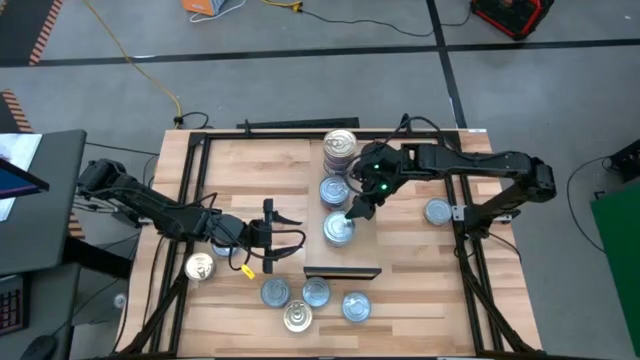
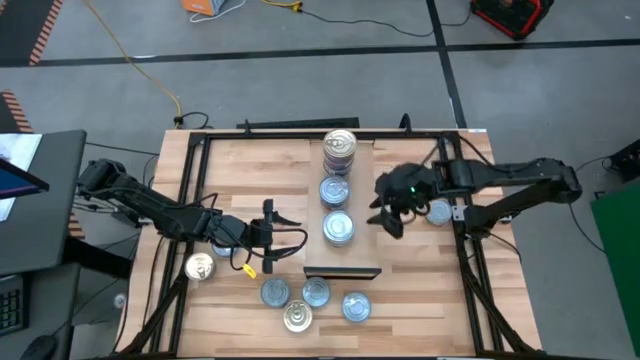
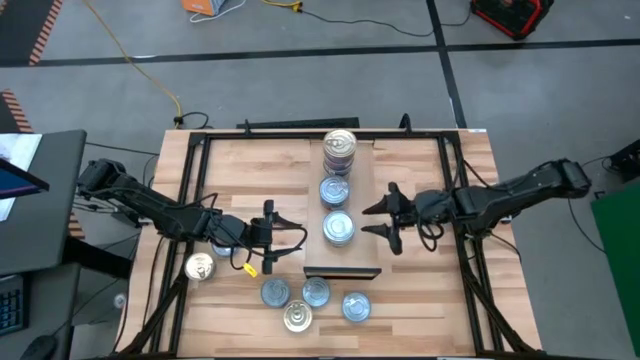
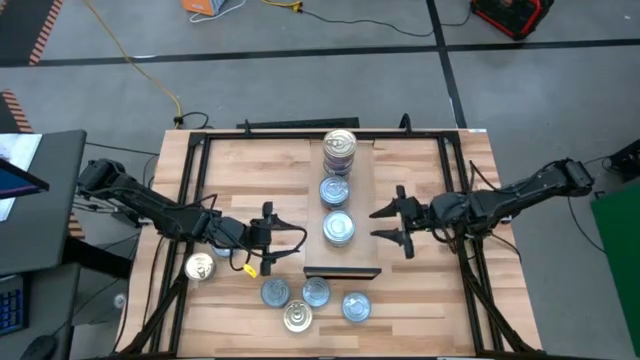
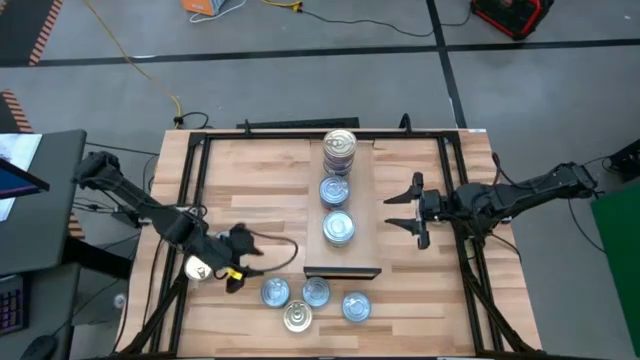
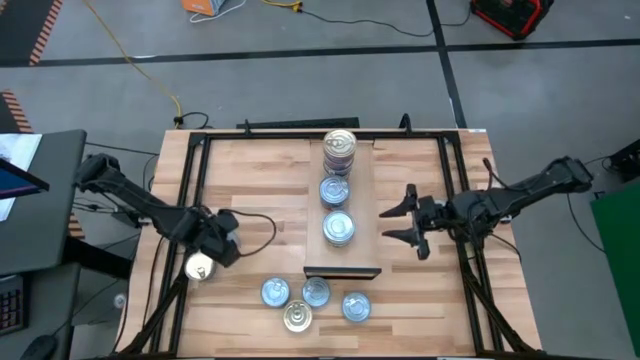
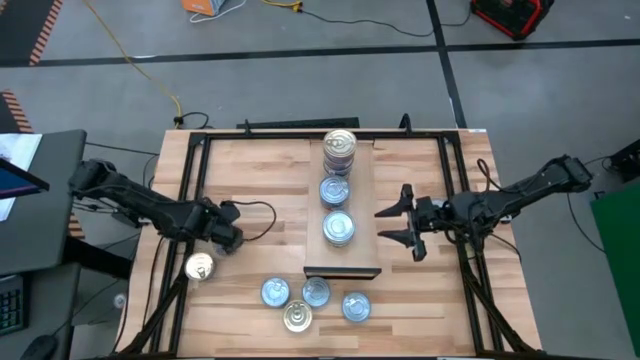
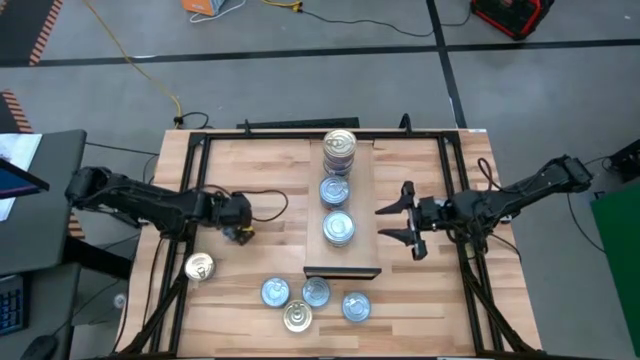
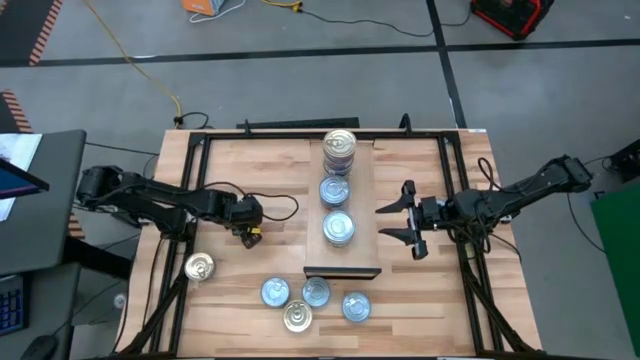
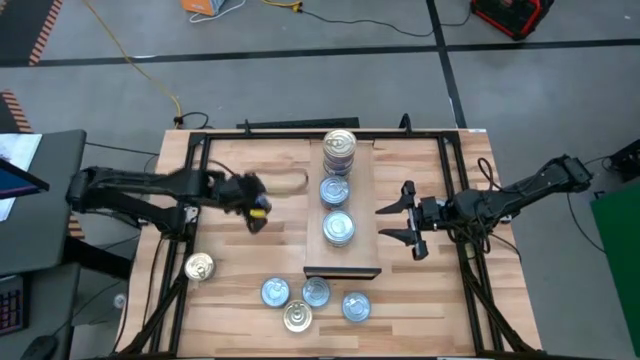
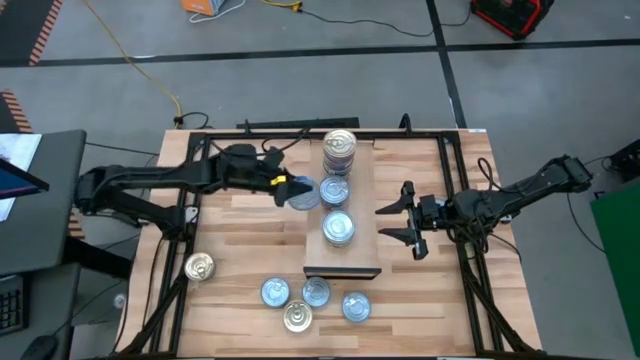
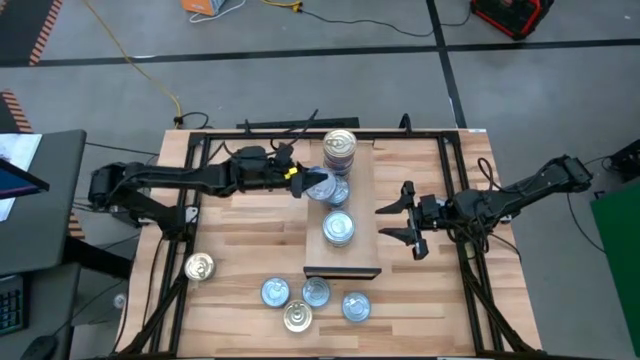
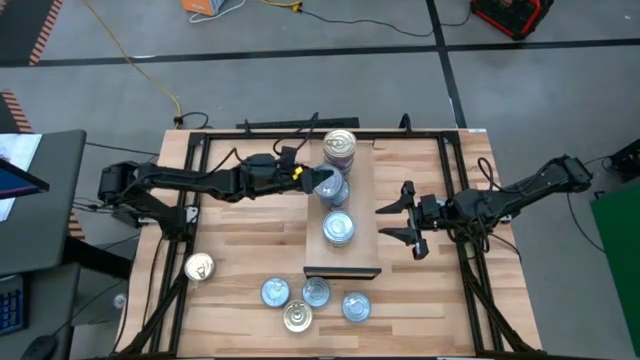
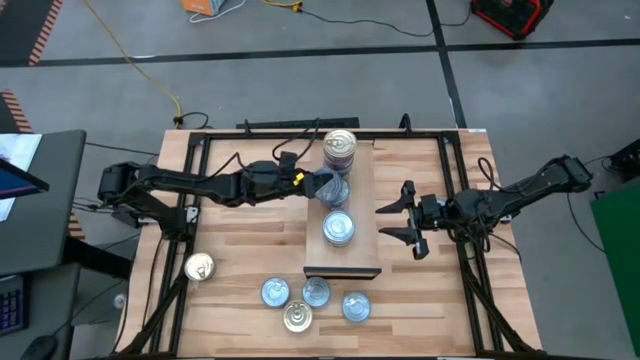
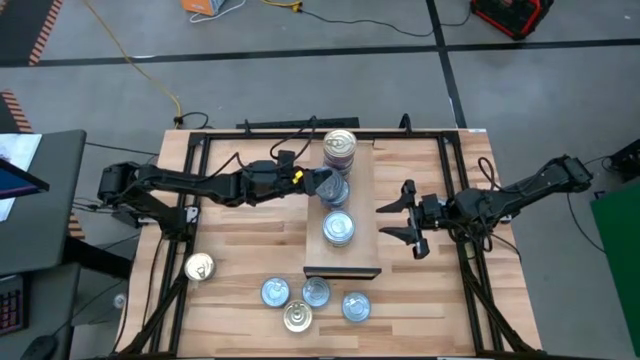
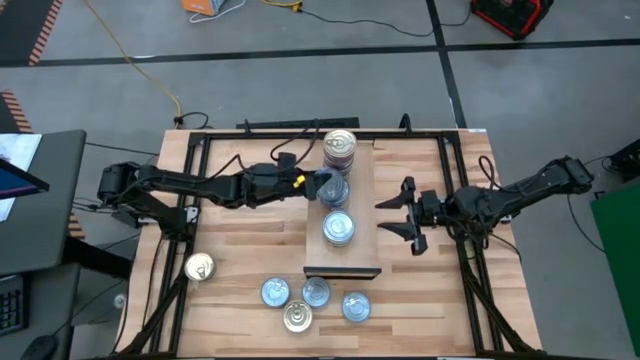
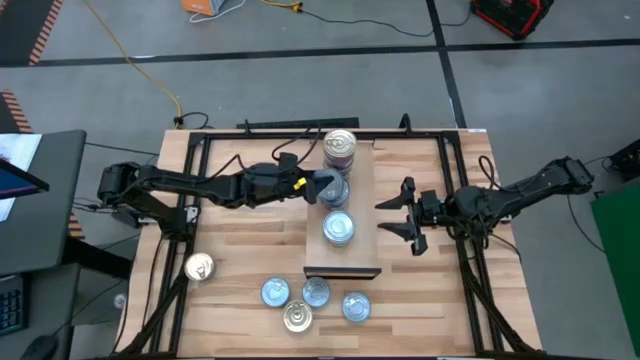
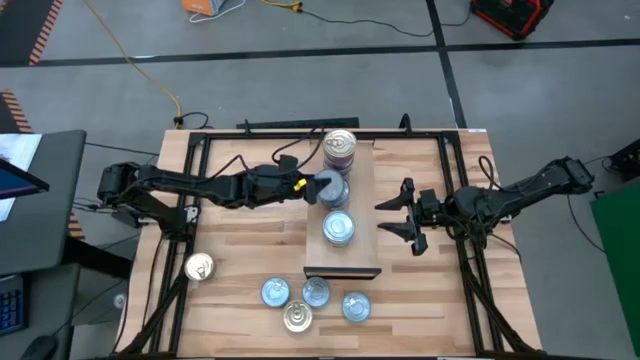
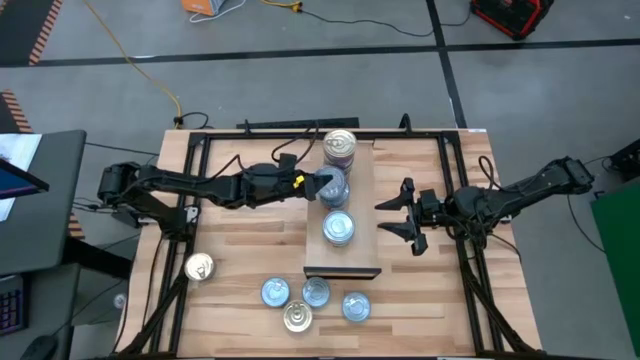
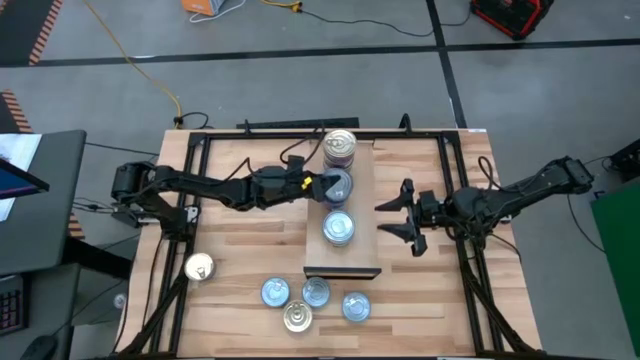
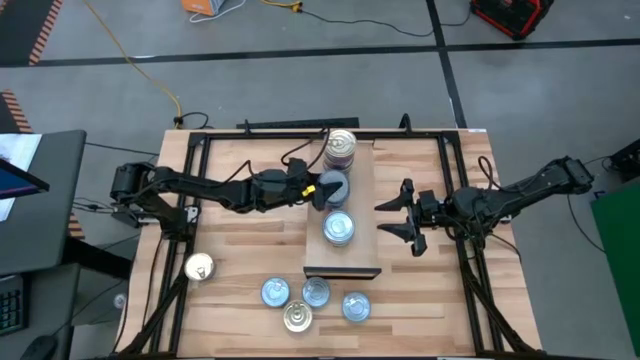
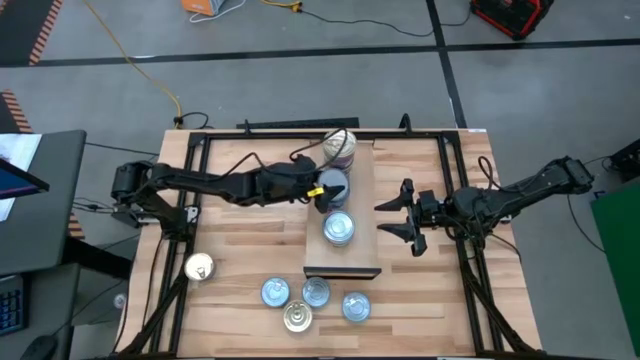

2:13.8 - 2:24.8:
Task: Stack canned seafood by type on shelf
Stack the blue tuna can on the shelf on top of the other blue tuna can

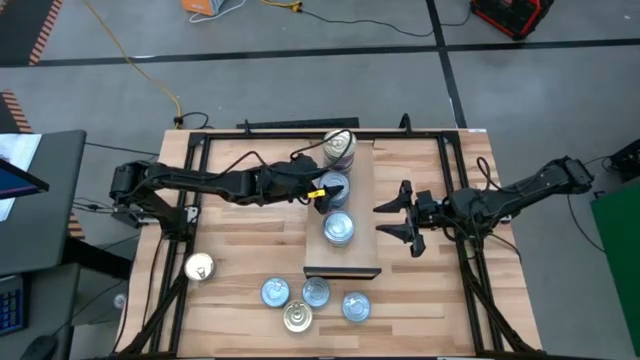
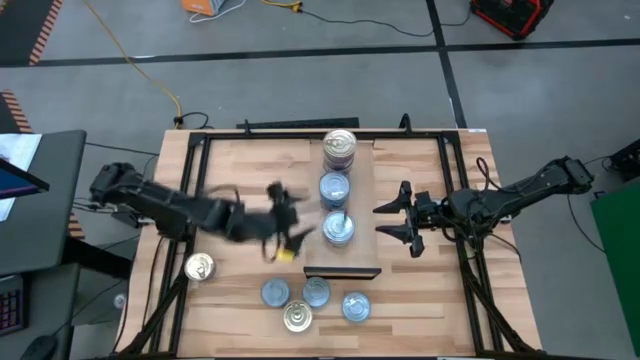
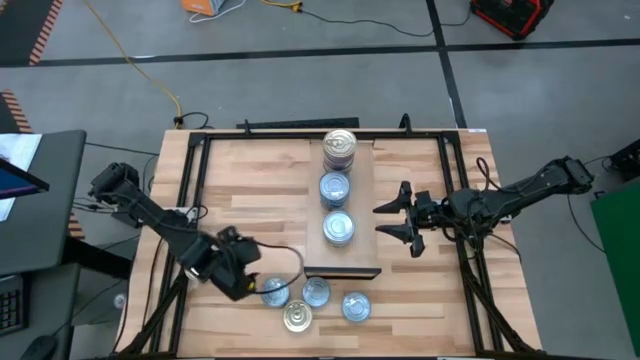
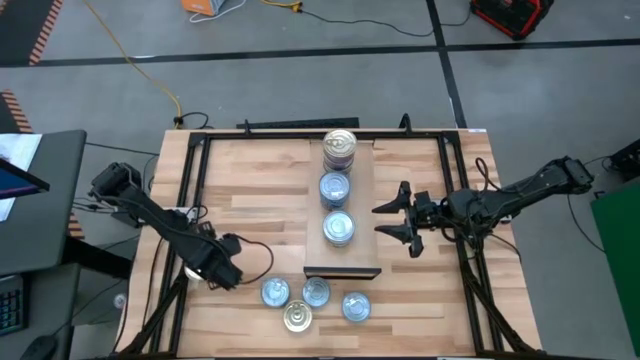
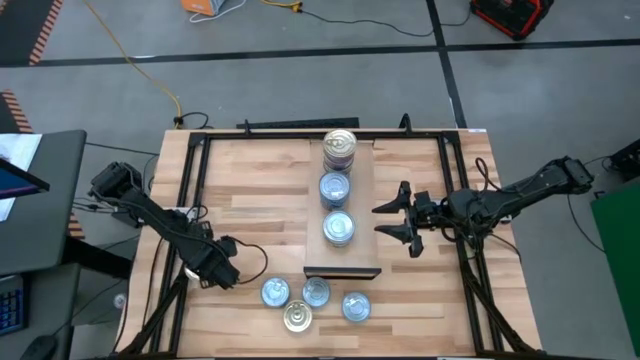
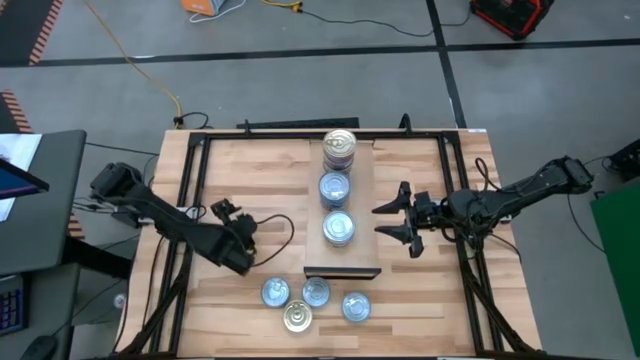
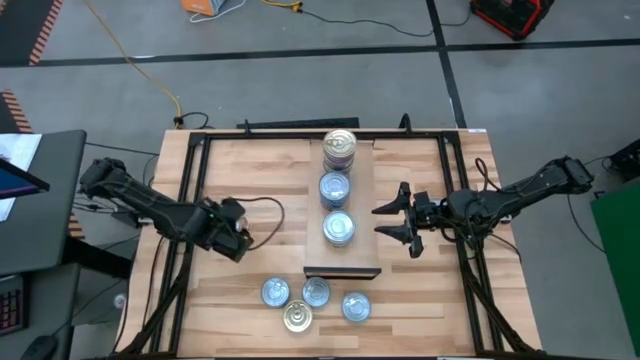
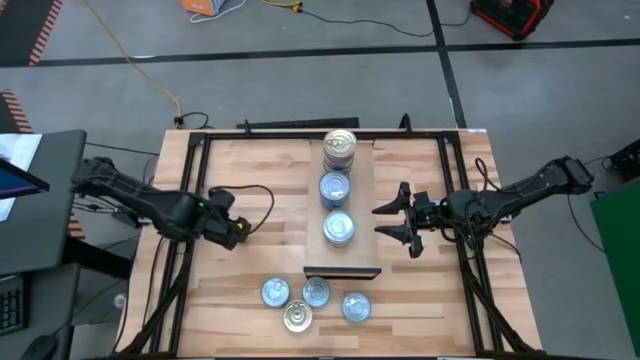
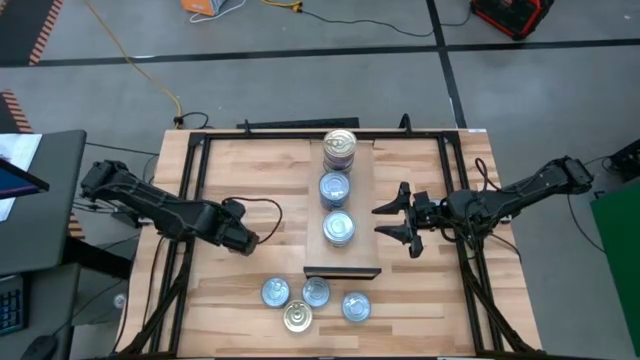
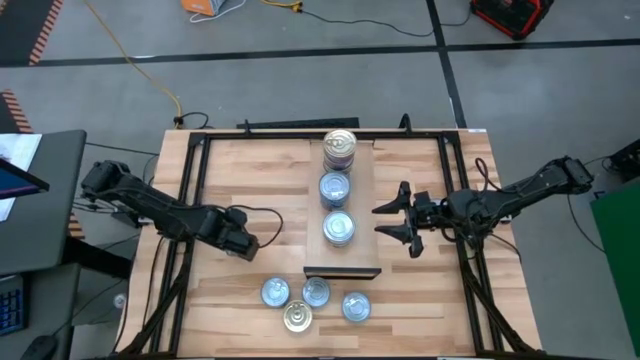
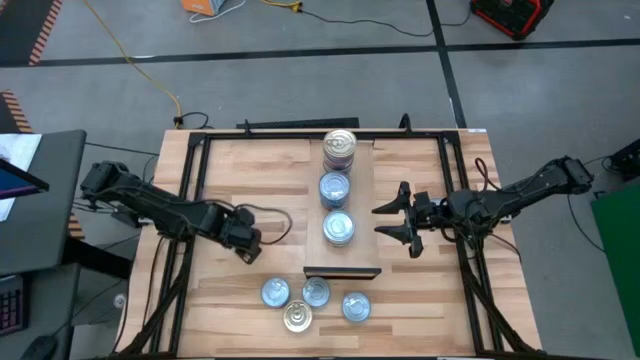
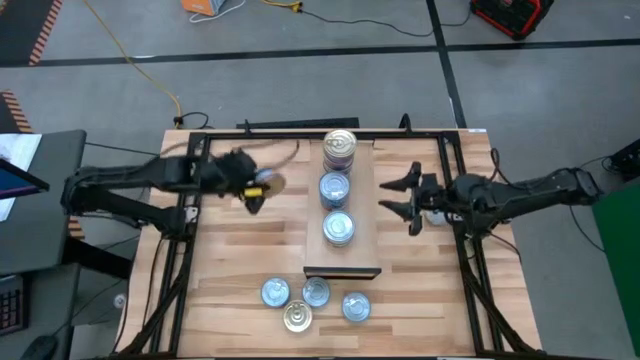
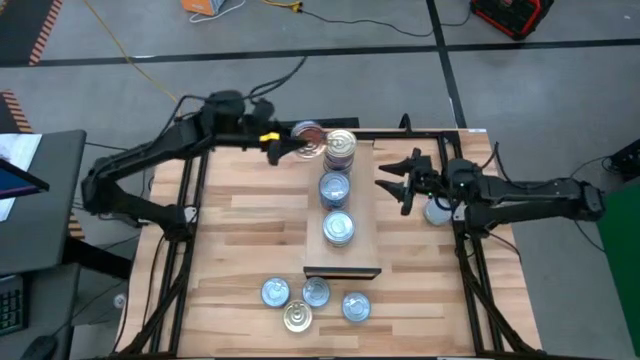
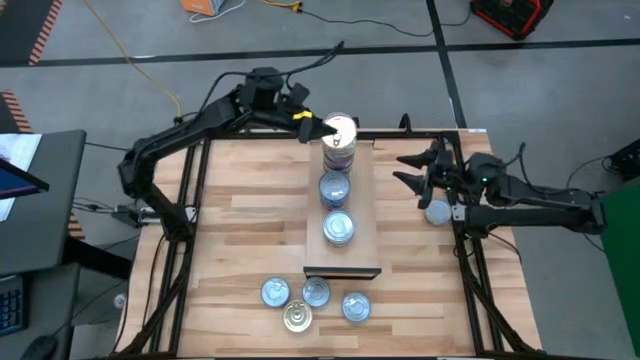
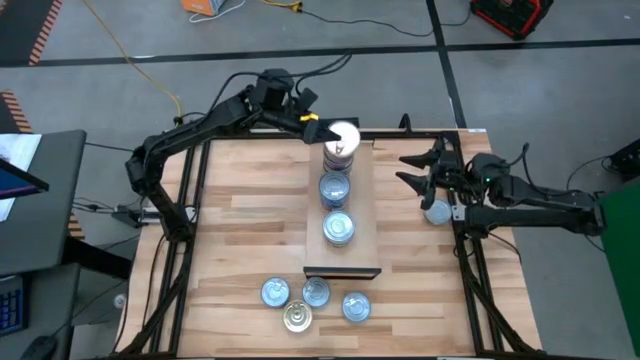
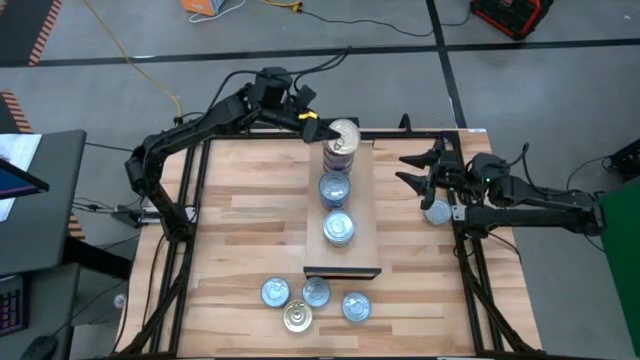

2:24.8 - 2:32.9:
Stack the blue and pink tuna can on the shelf on top of the other blue and pink tuna can

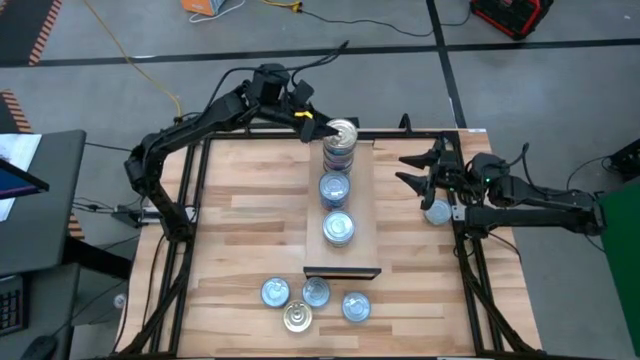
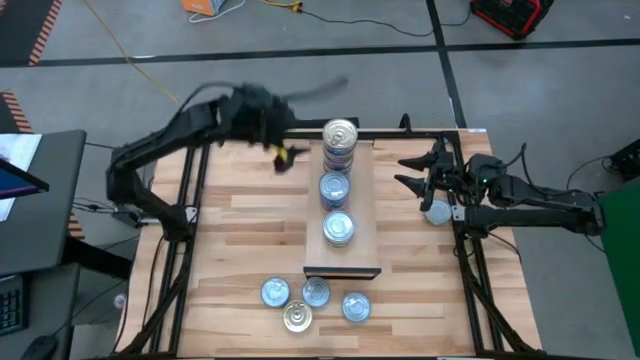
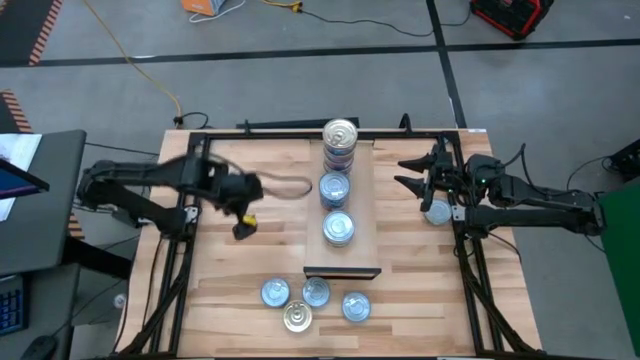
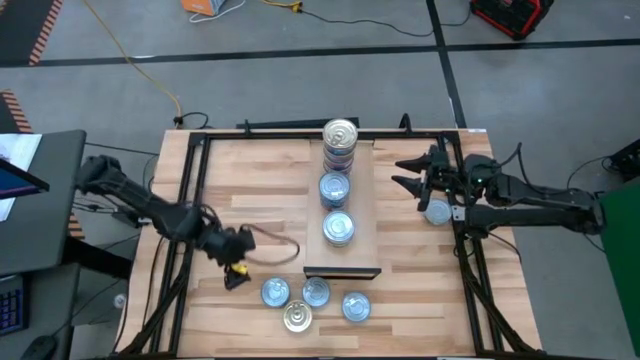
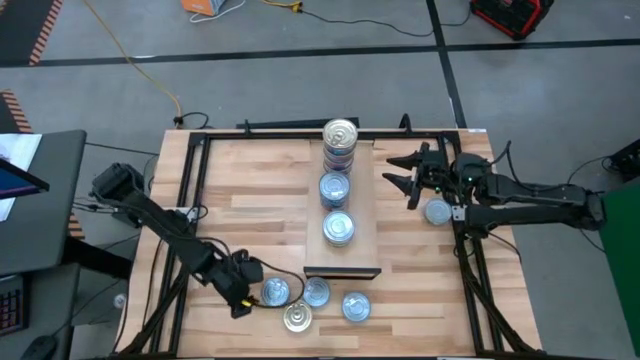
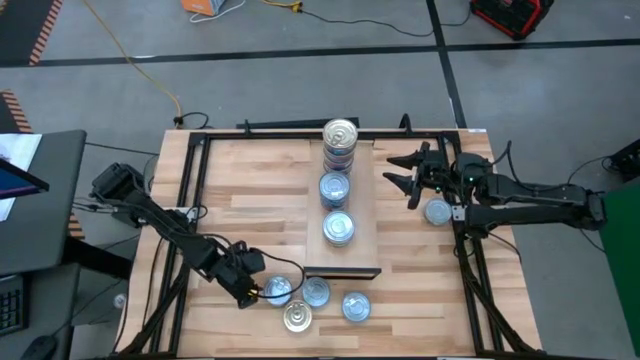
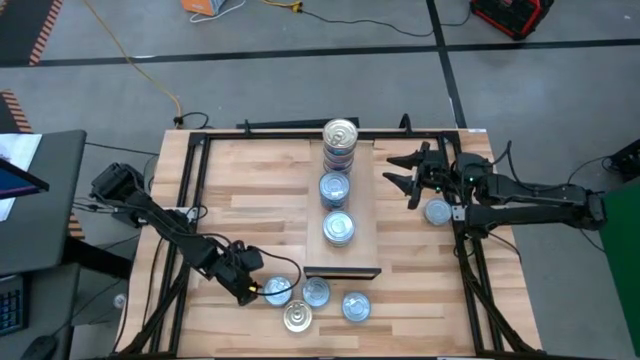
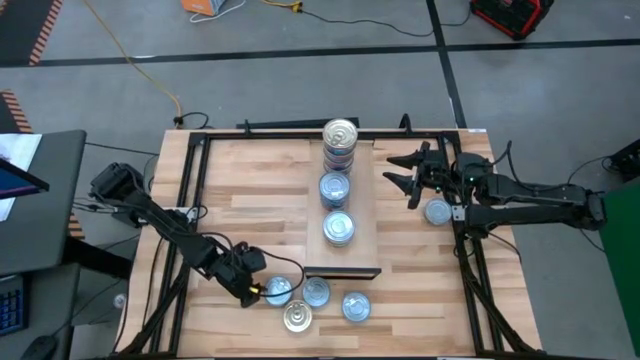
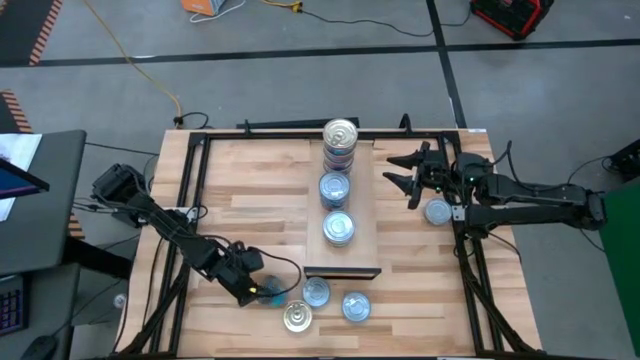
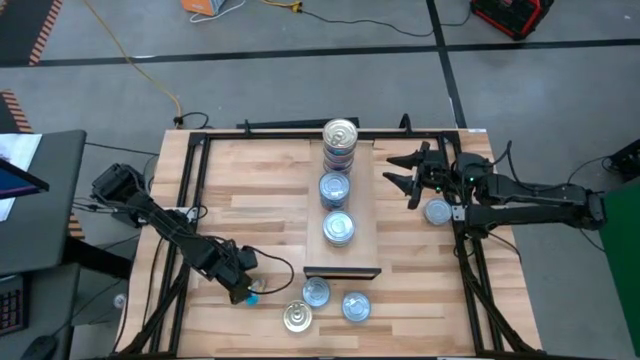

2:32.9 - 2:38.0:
Stack the yellow and blue tuna can on the shelf on top of the blue tuna can
